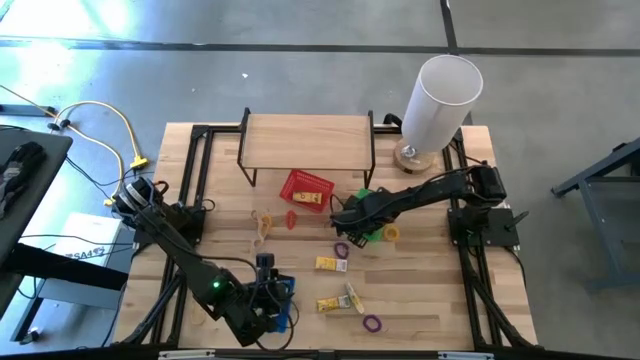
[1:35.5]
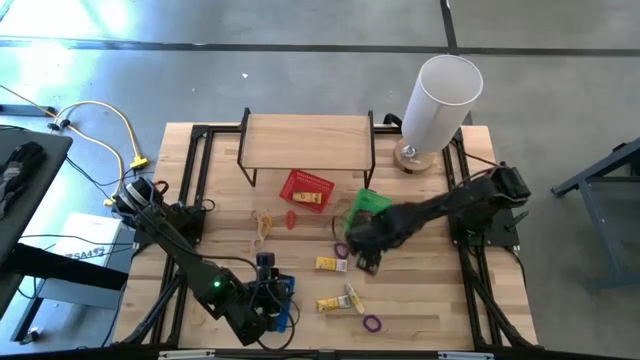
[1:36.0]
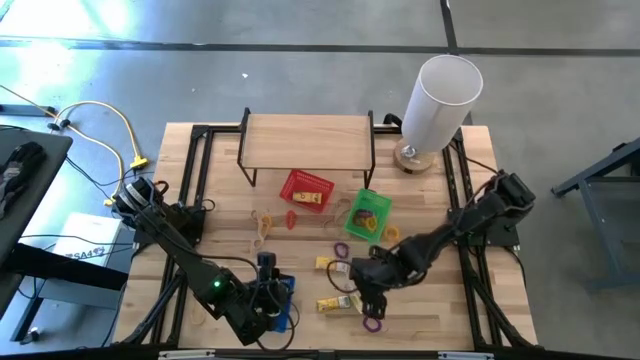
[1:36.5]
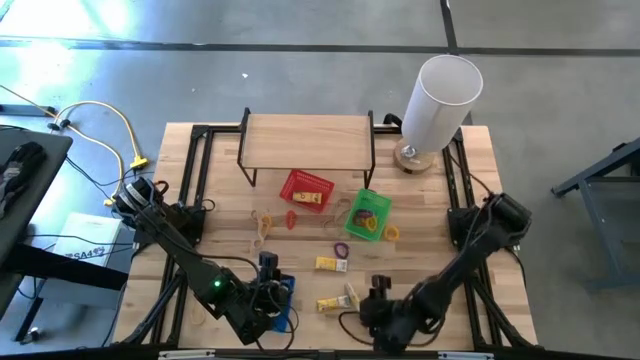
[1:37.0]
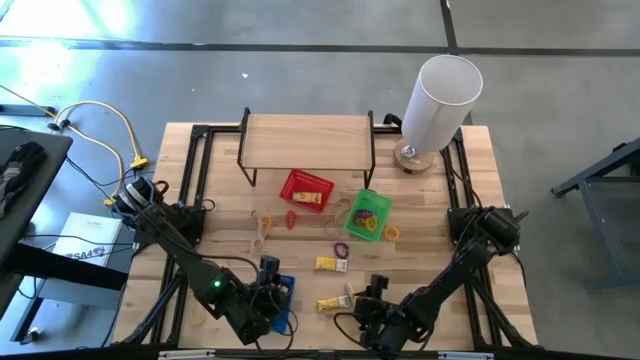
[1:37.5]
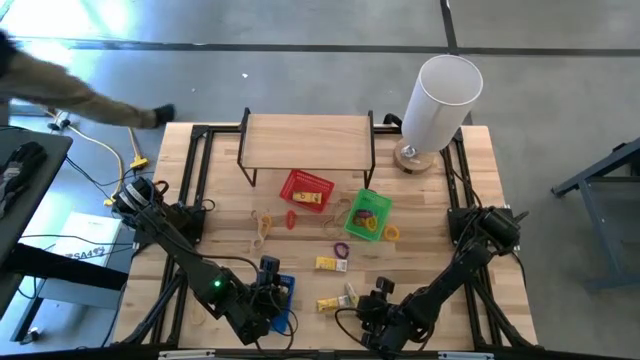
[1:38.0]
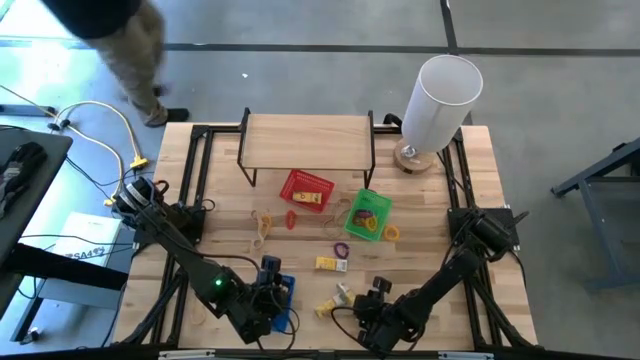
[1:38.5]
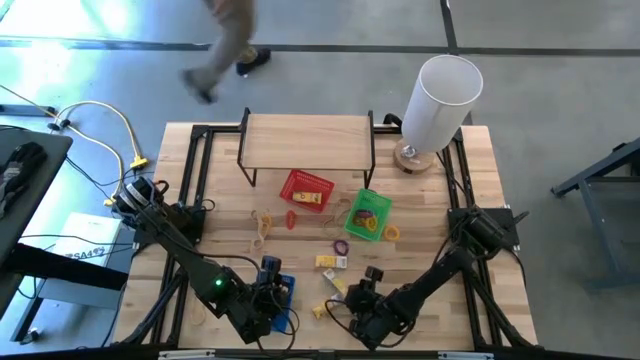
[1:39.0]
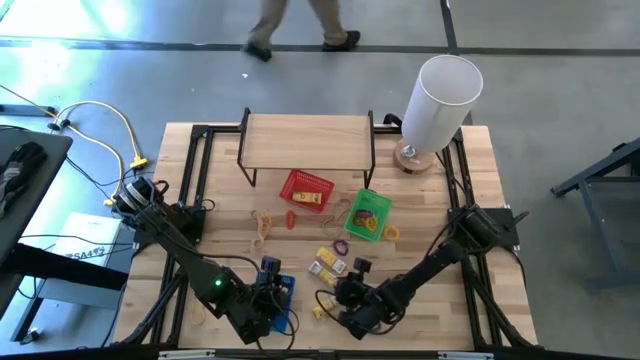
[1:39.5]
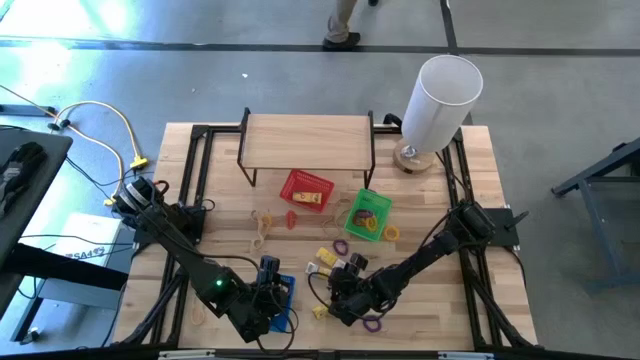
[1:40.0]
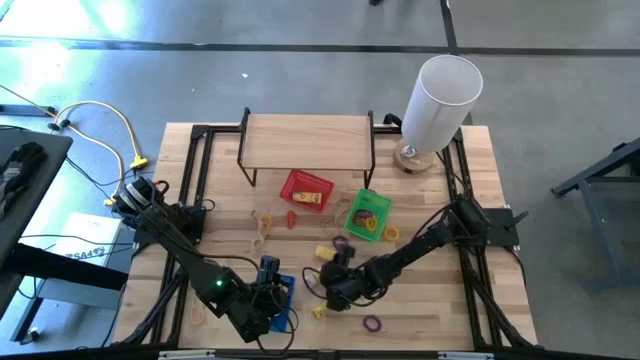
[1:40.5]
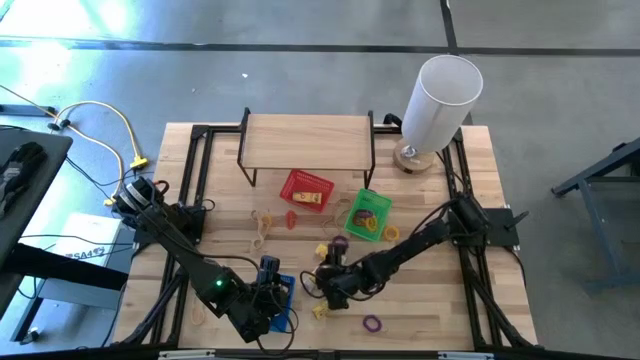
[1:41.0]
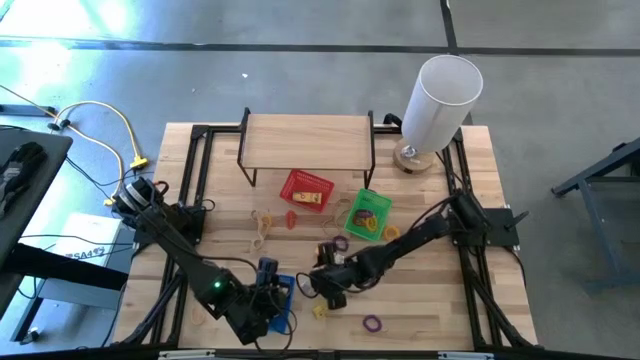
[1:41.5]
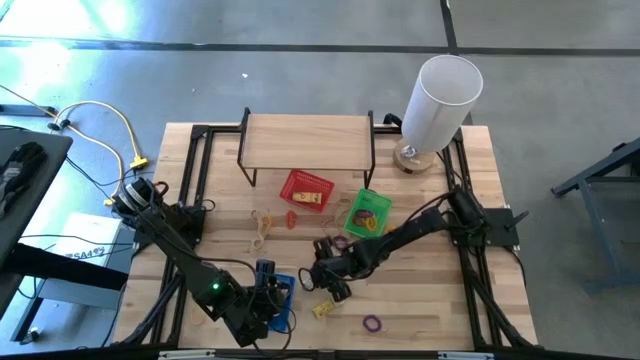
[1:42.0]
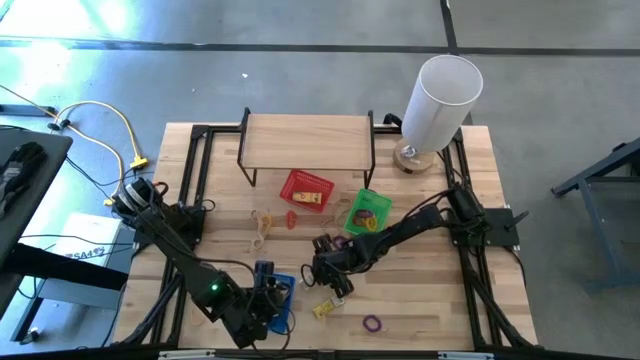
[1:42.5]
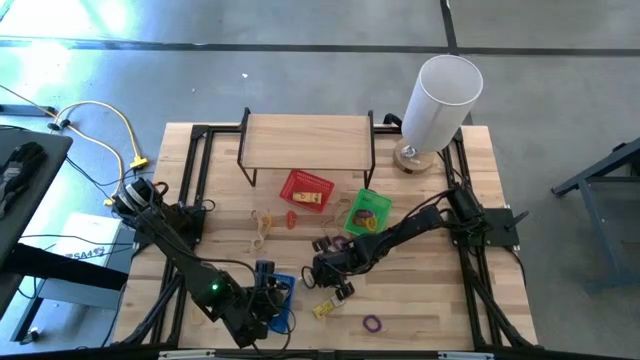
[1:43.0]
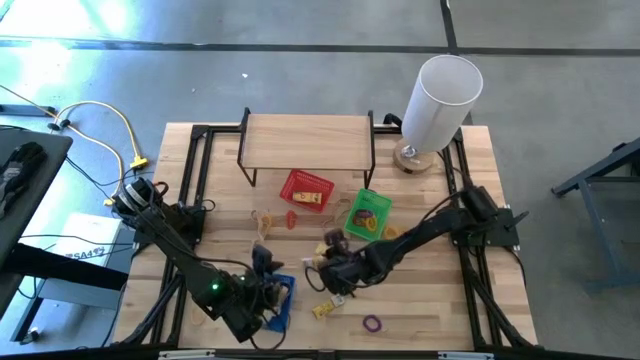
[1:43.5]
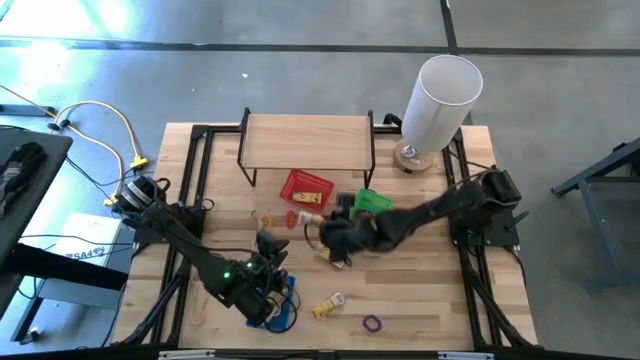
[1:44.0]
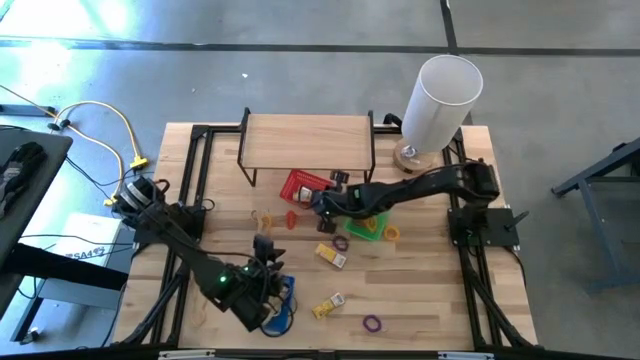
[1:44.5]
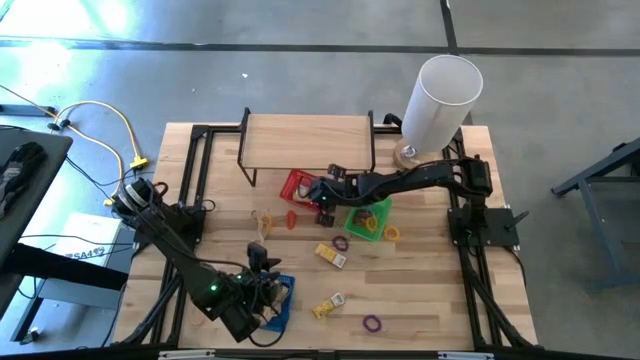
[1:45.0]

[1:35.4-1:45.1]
Task: Pick & Place Office Desk Supplies
Put the yellow crayon box into the red bin

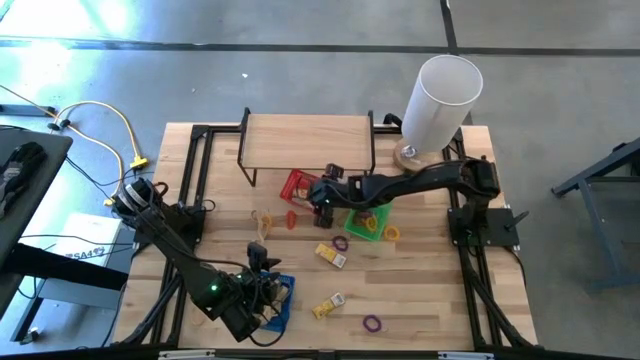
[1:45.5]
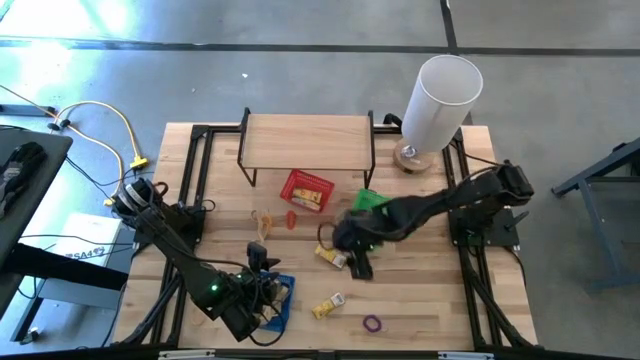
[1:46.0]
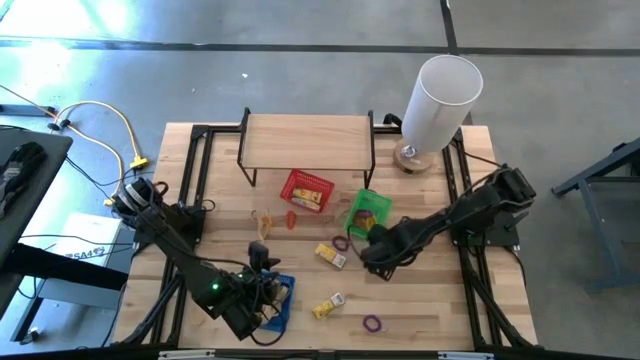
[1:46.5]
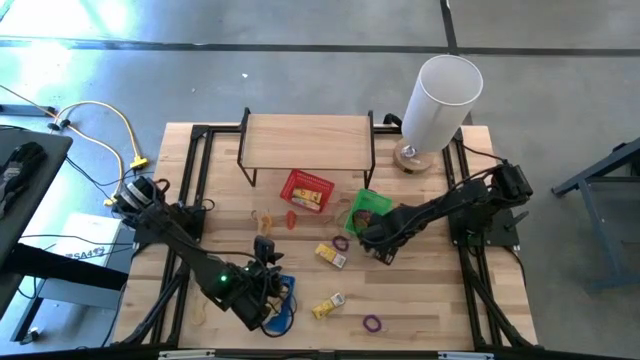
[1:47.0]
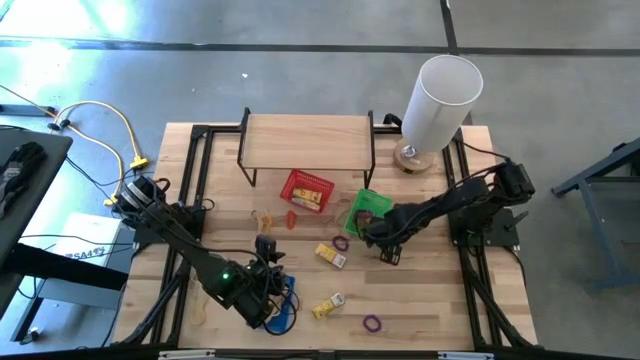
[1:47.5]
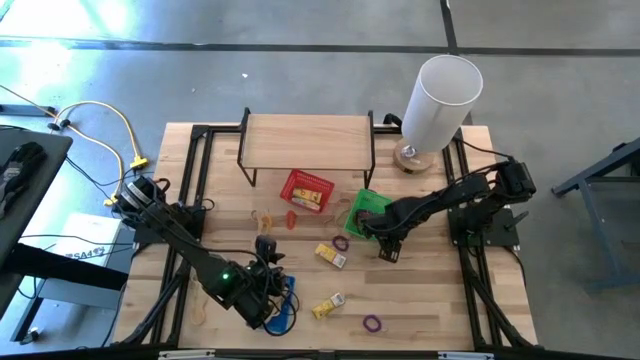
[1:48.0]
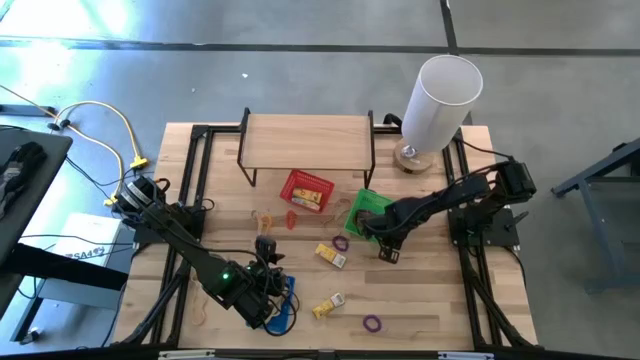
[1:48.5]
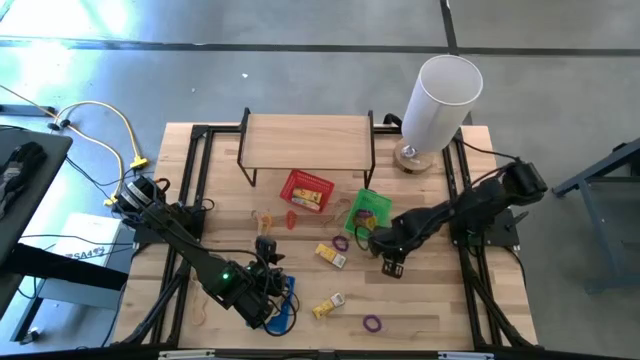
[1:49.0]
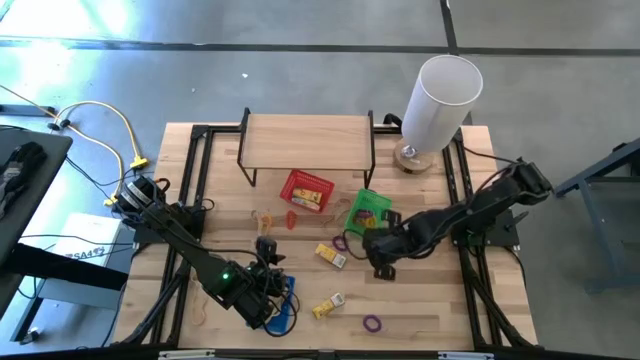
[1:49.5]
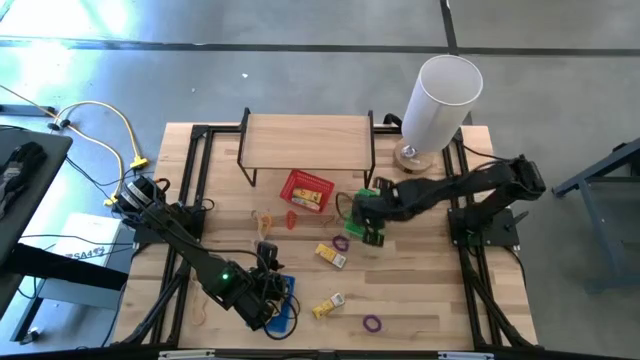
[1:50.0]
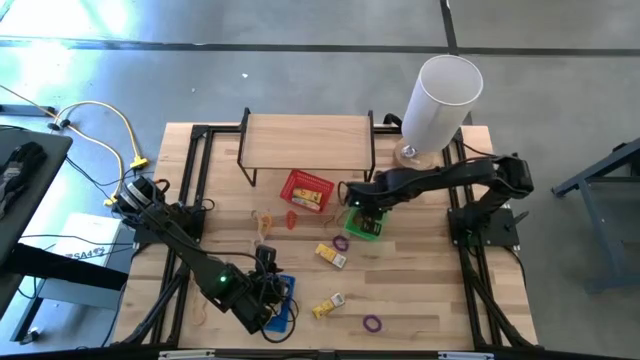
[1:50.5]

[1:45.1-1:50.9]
Put the yellow spring keychain into the green bin

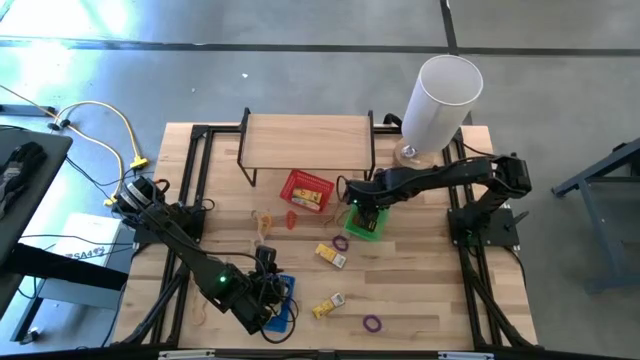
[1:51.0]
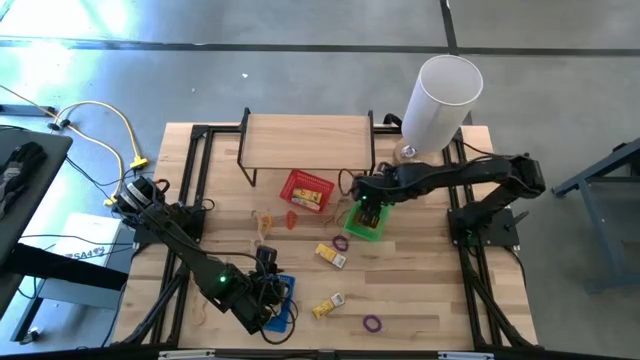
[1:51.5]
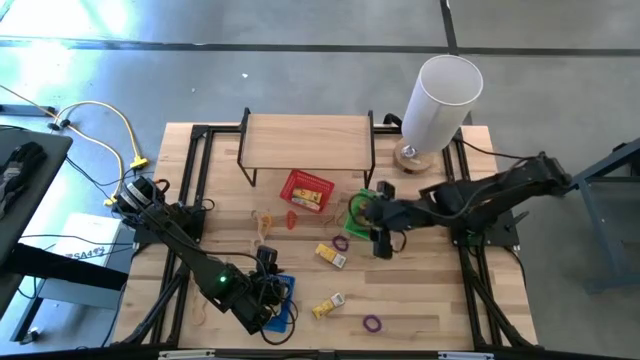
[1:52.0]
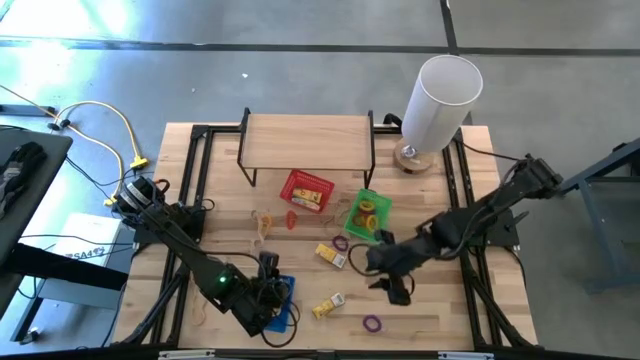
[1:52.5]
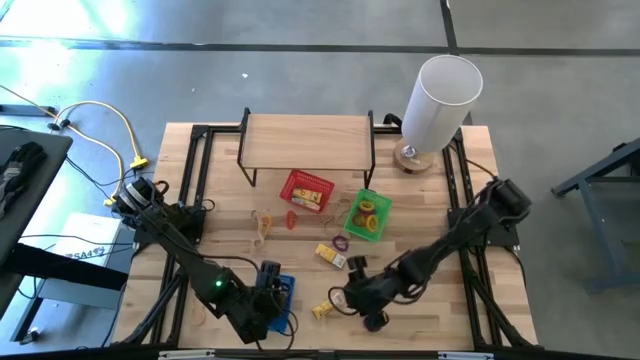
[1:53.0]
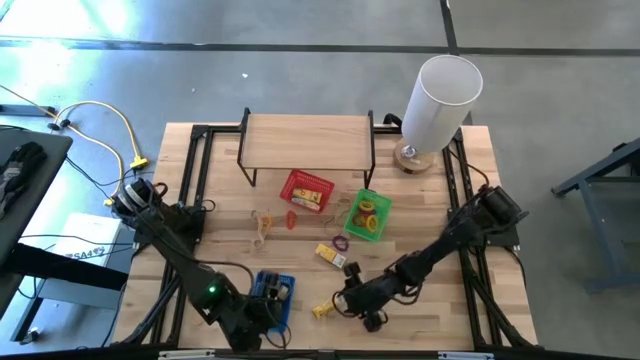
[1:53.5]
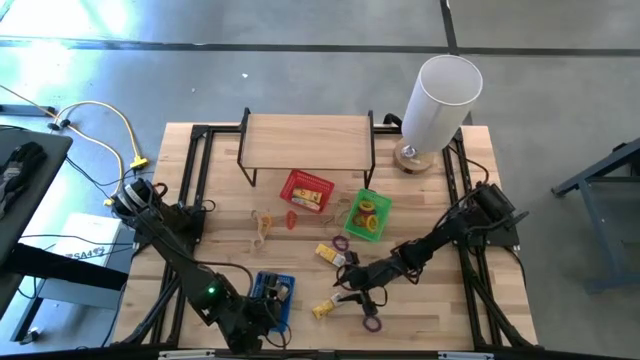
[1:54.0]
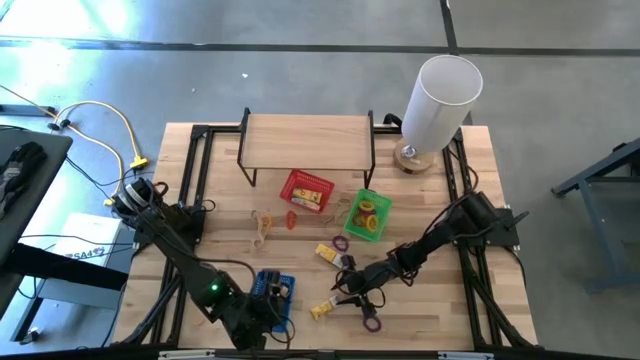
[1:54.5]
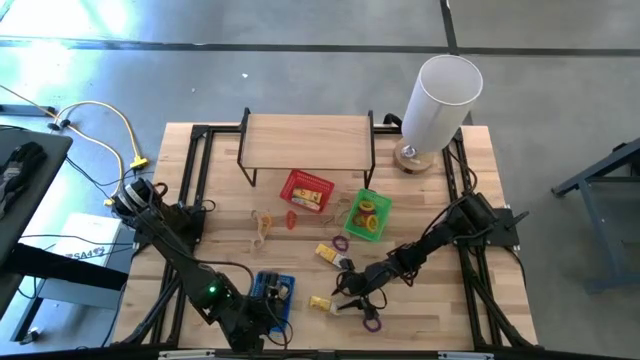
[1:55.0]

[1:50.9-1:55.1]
Put the yellow crayon box into the red bin
